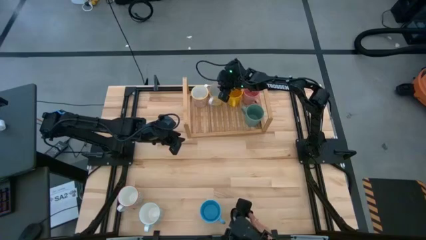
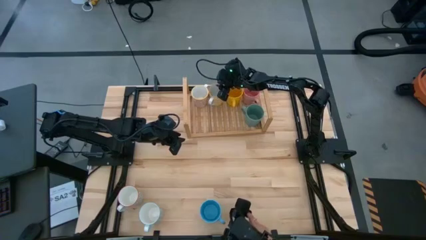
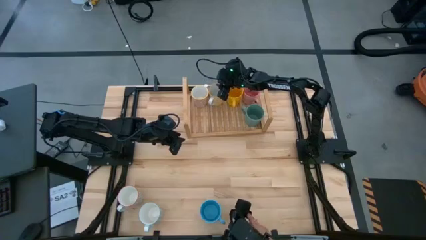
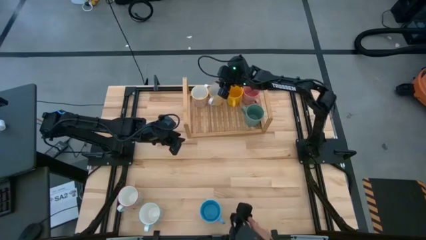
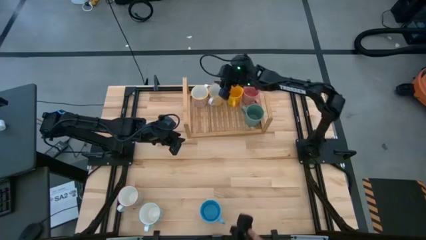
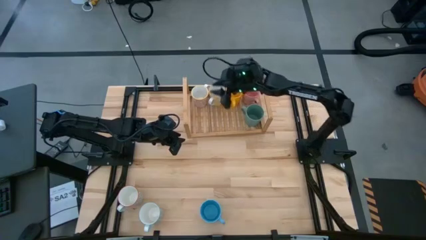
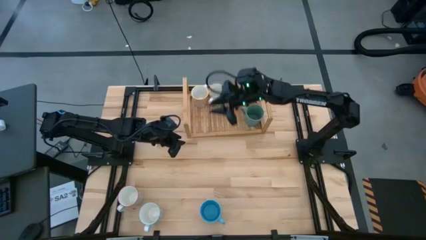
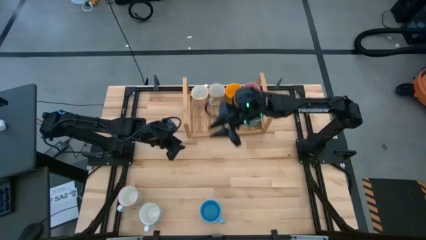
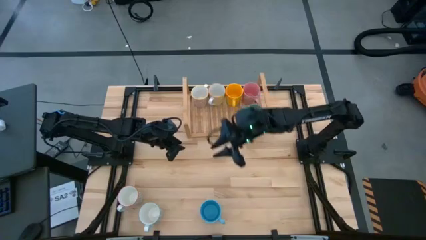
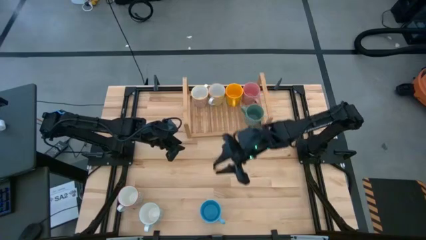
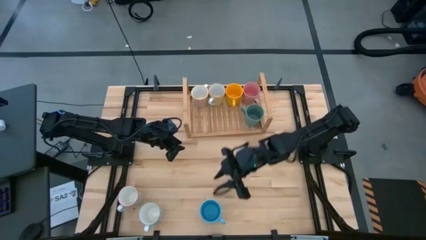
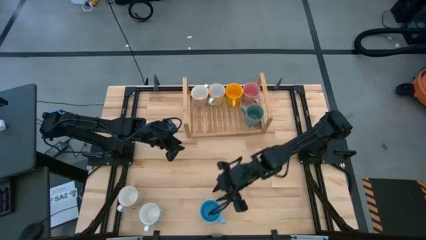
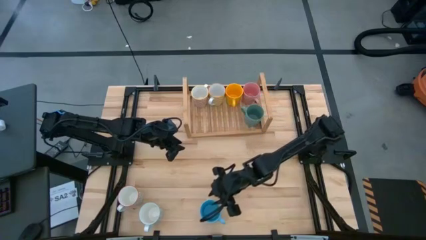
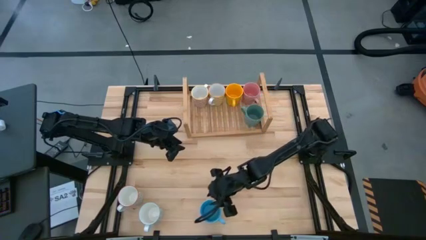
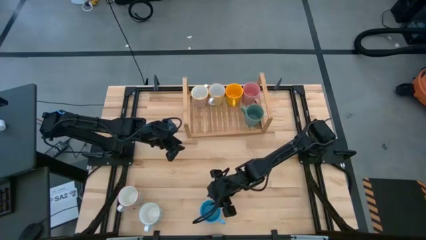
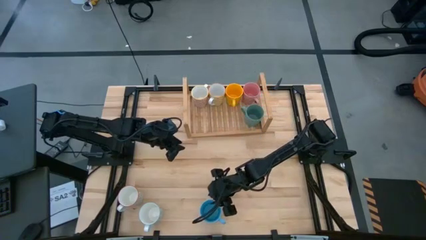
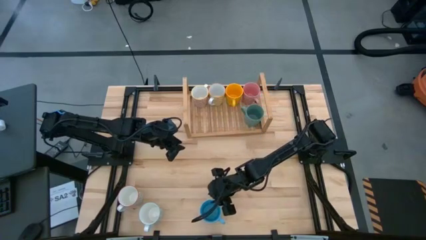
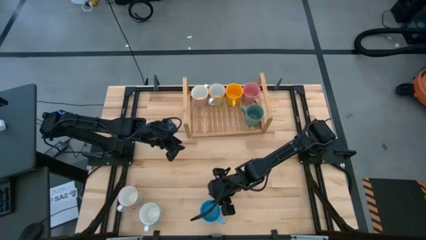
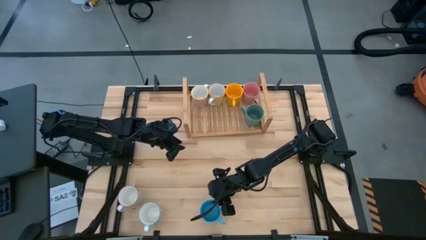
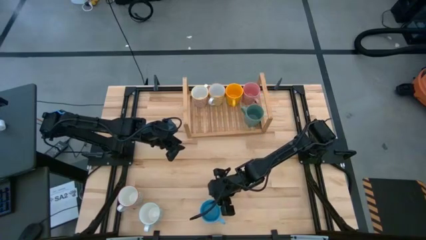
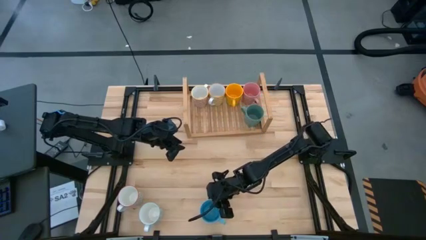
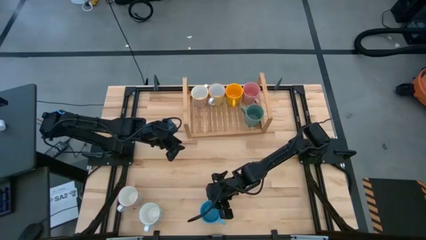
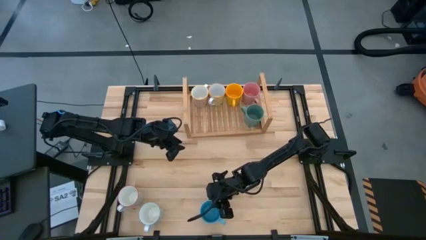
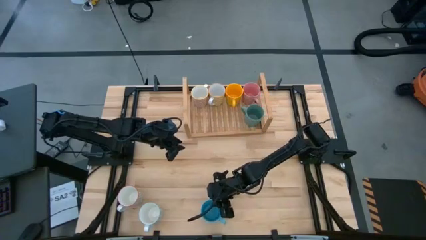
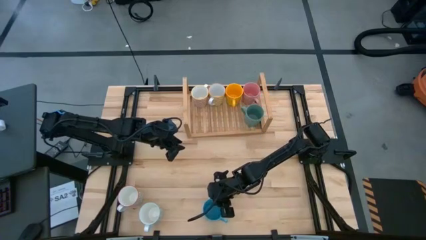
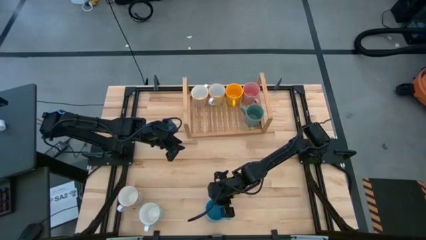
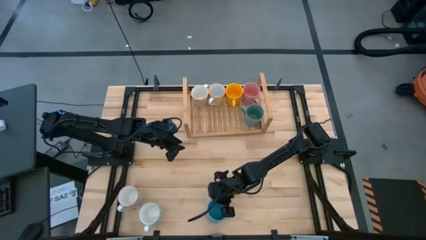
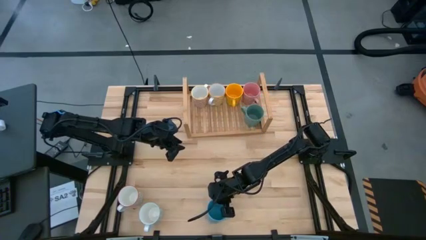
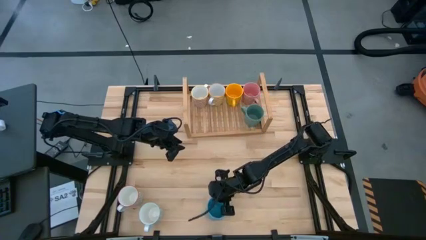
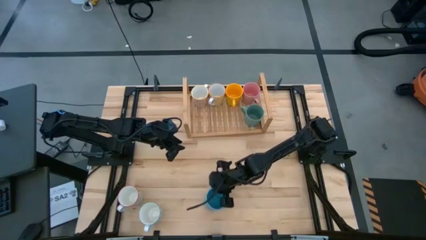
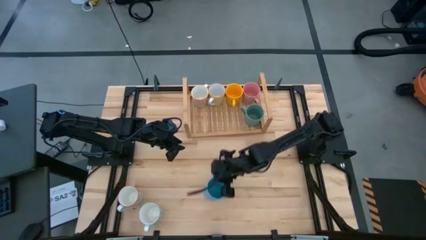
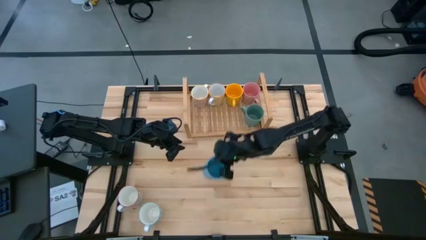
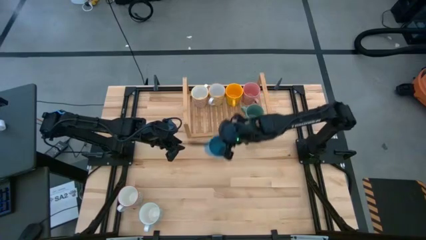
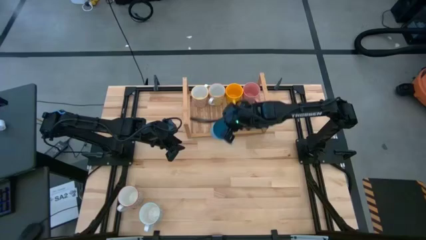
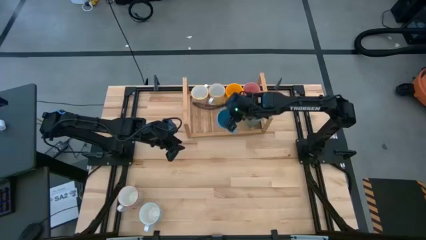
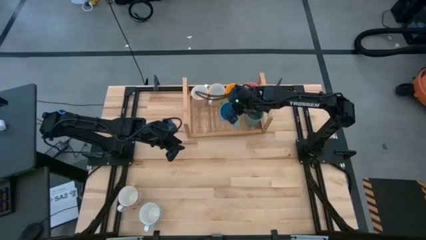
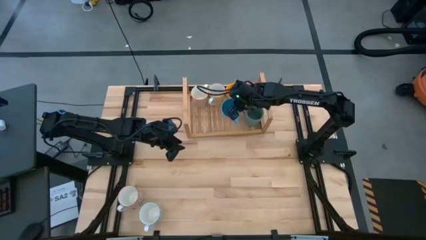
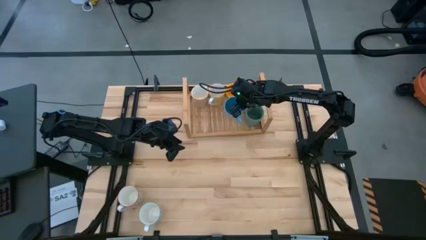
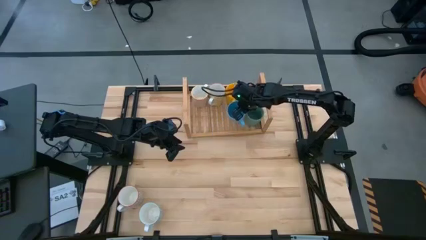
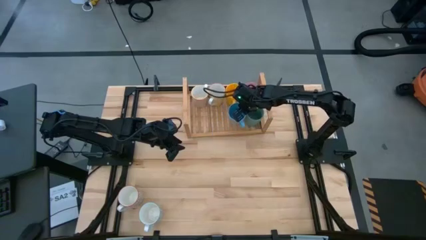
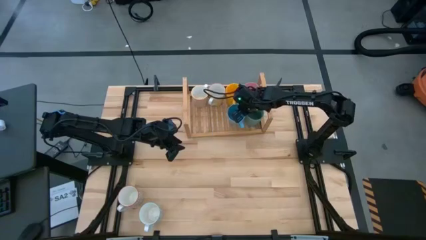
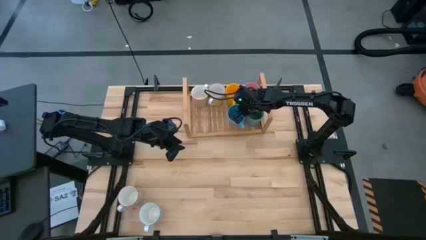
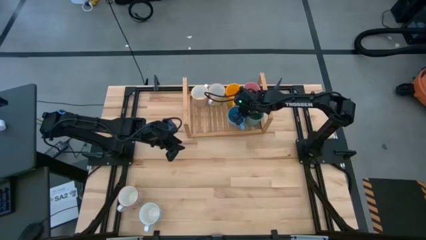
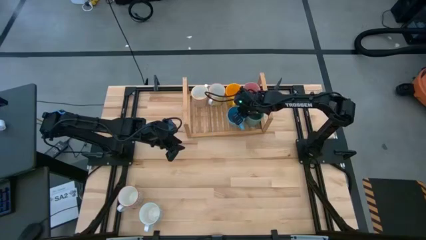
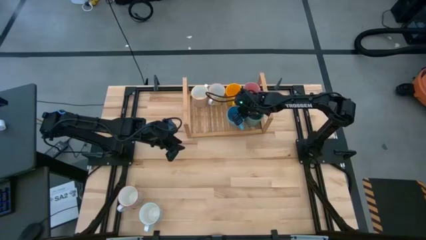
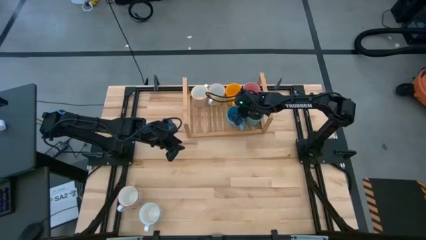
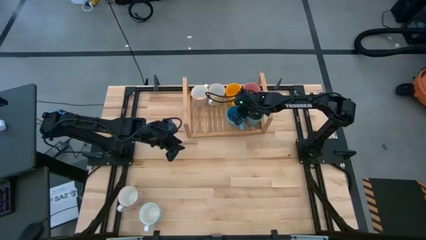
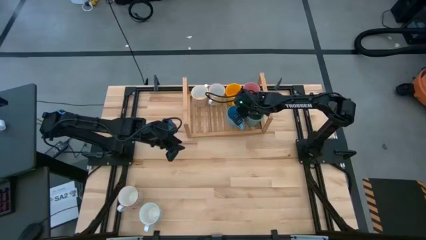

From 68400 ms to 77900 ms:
Task: Place coffee mugs
Put the blue mug on the shelf

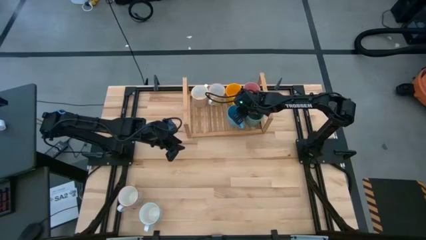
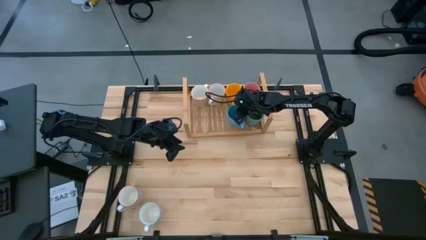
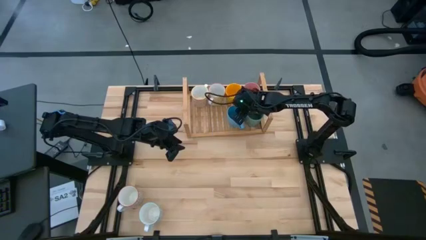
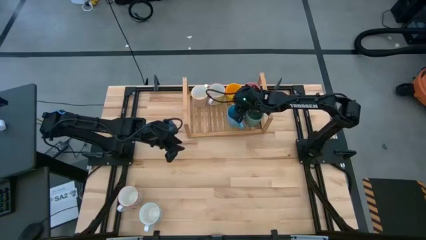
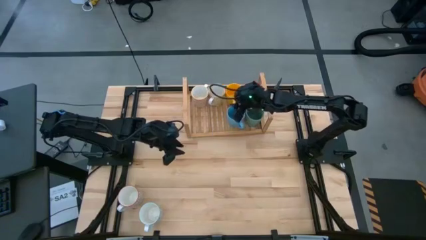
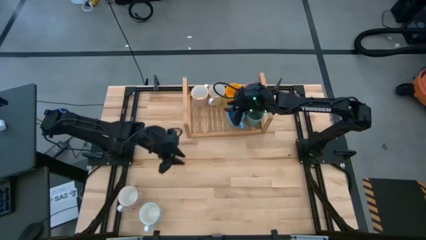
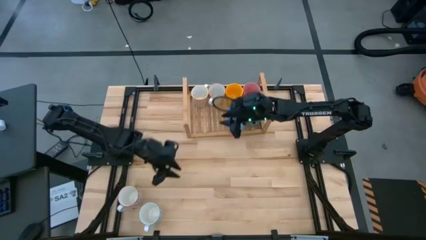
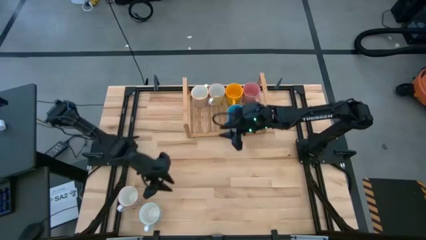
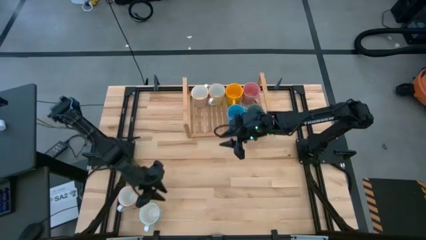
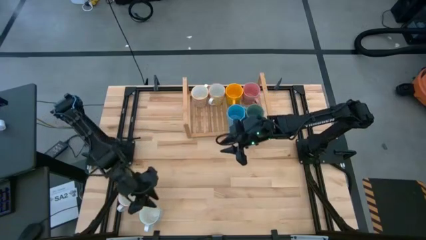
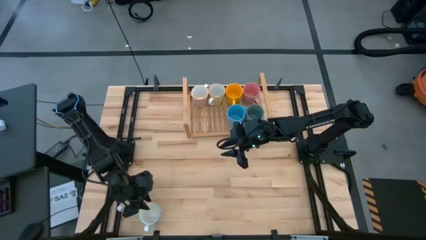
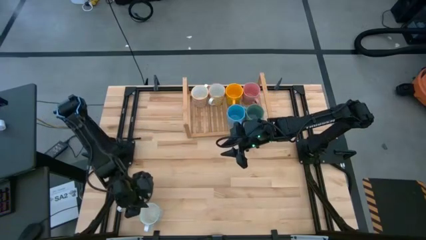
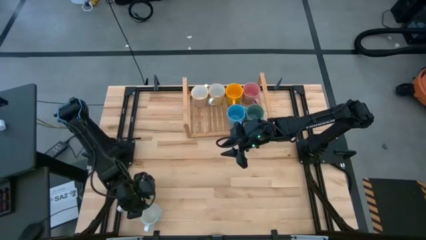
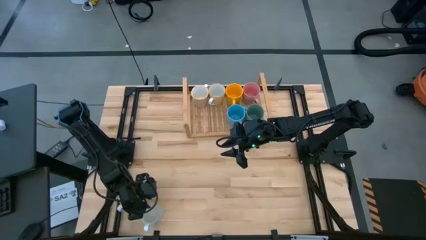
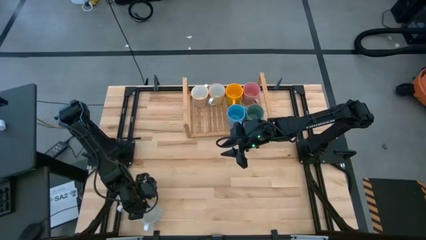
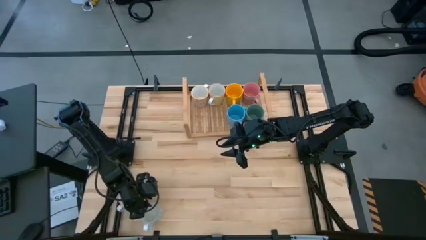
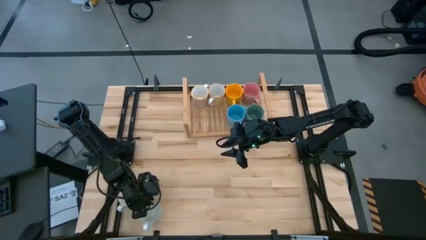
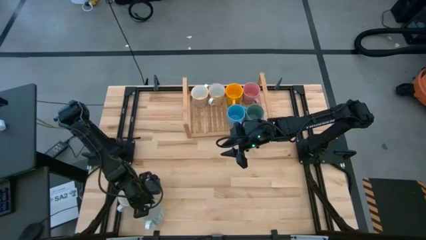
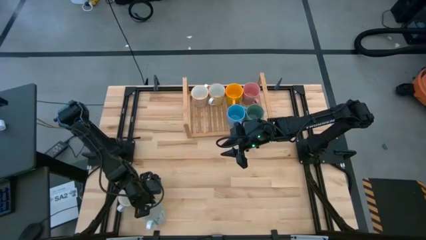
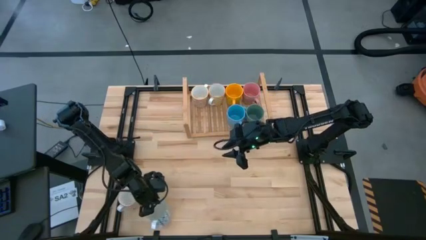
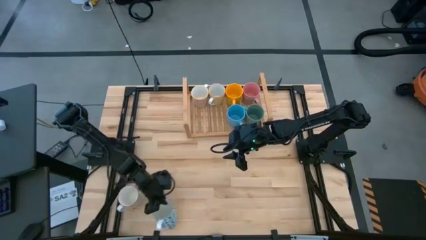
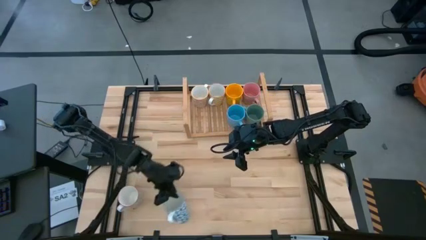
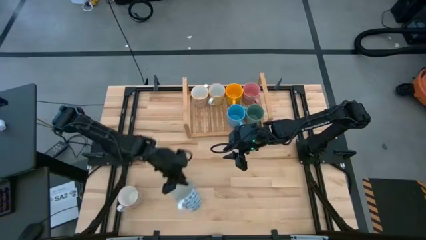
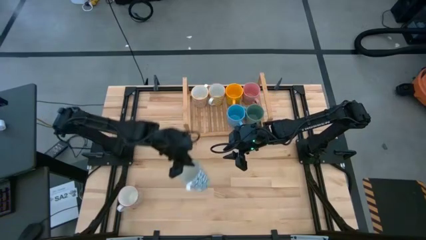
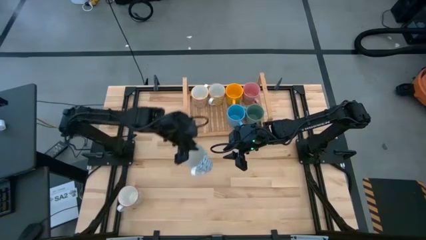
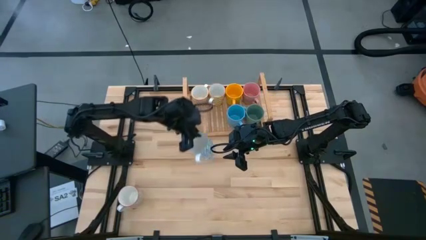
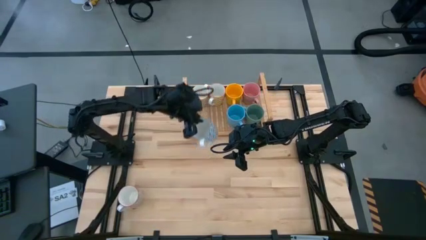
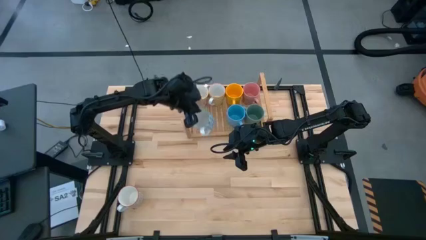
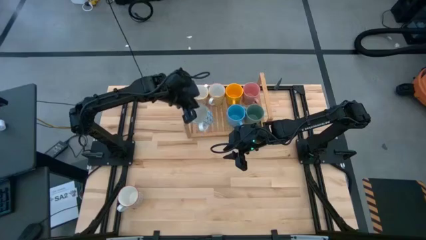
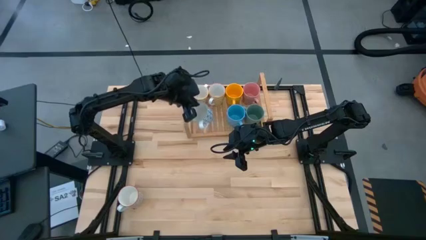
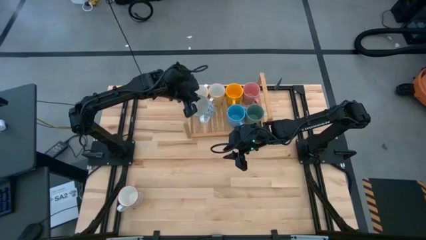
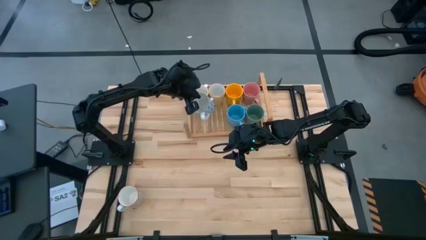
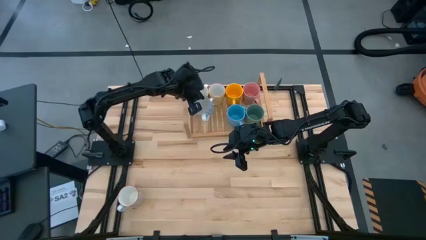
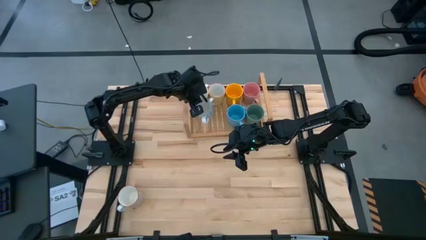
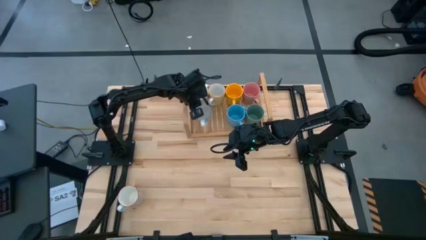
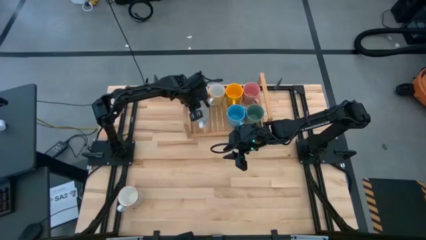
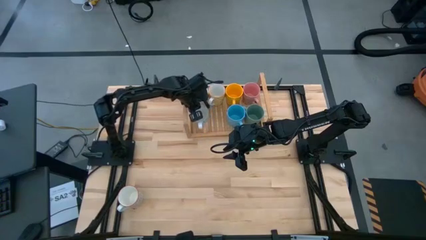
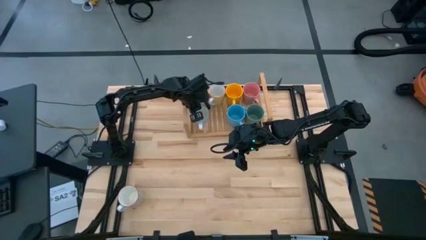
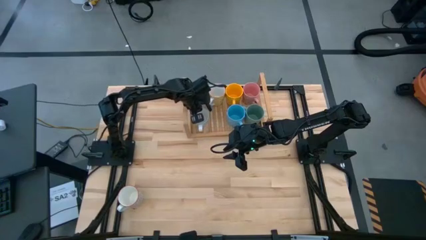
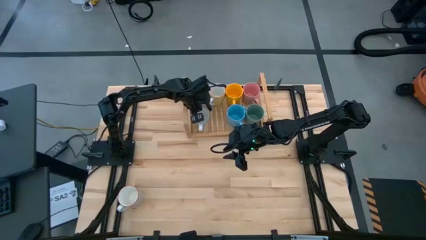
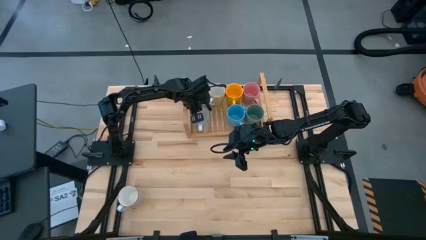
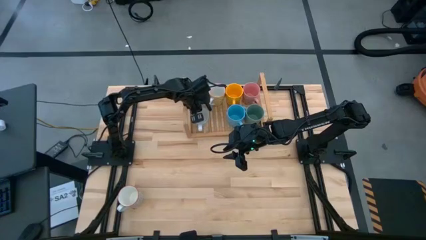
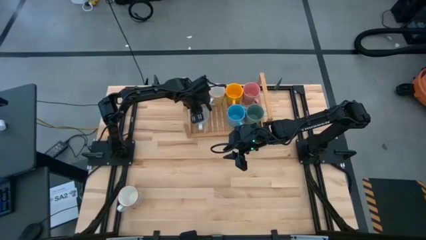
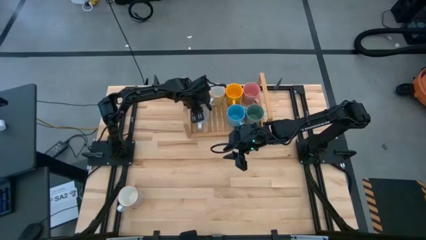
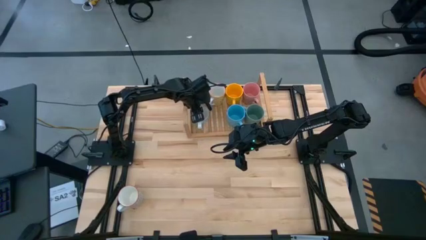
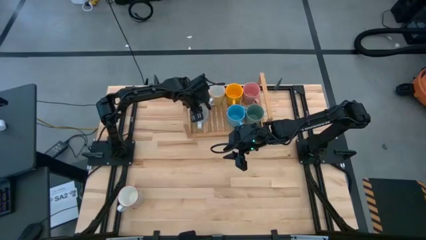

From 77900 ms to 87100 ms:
Put the blue patterned mug on the shelf
